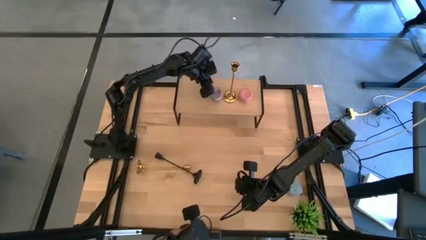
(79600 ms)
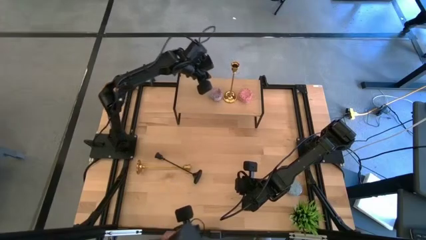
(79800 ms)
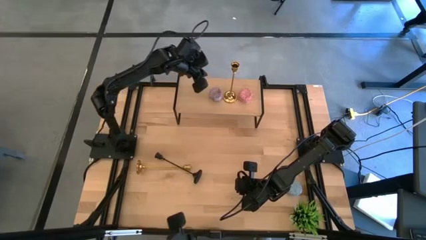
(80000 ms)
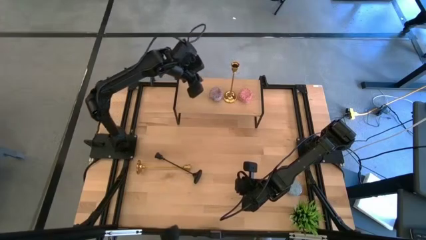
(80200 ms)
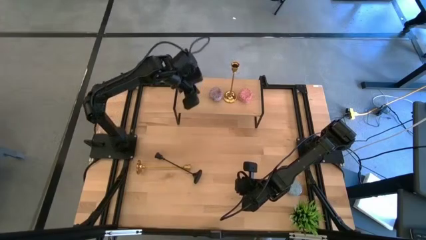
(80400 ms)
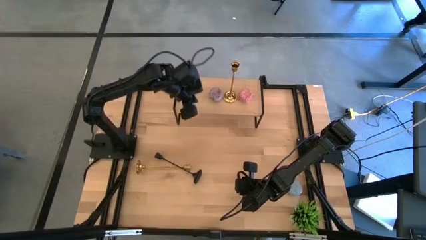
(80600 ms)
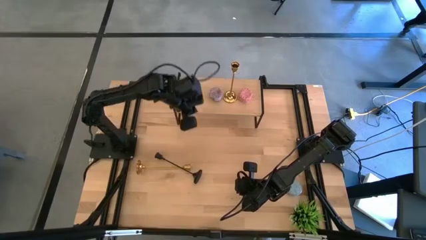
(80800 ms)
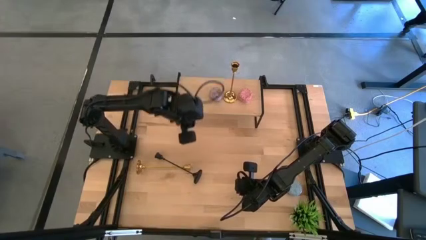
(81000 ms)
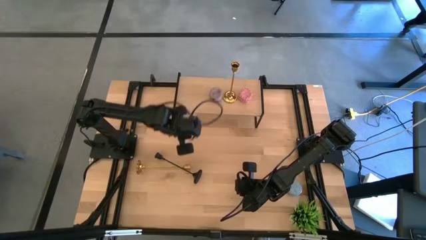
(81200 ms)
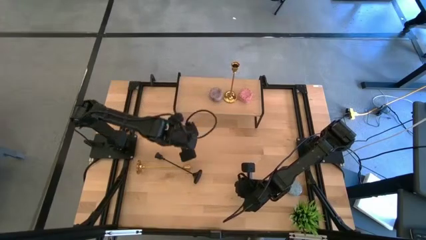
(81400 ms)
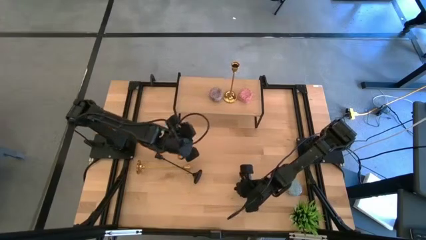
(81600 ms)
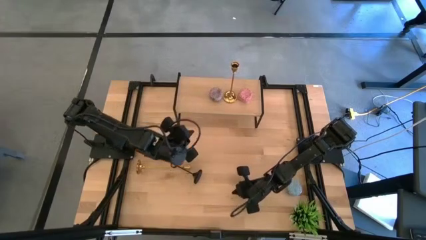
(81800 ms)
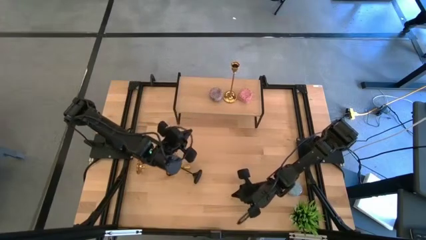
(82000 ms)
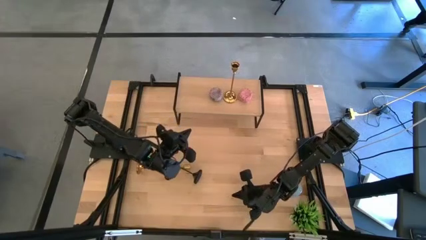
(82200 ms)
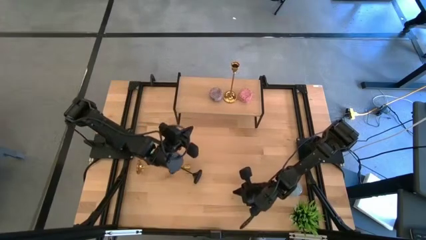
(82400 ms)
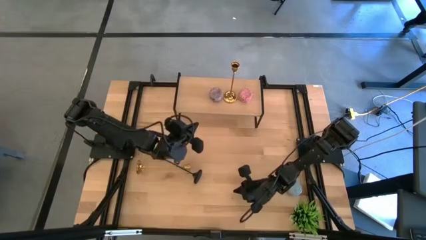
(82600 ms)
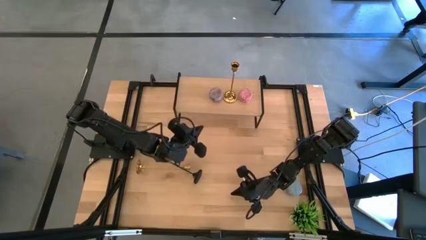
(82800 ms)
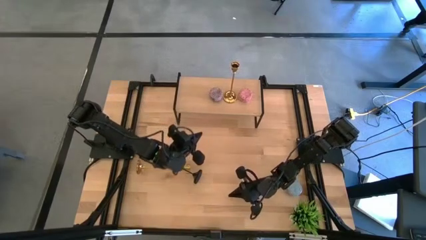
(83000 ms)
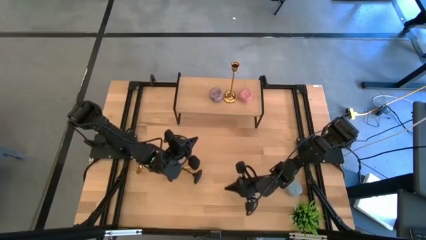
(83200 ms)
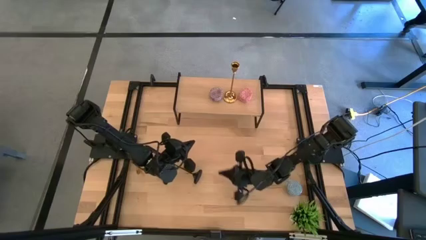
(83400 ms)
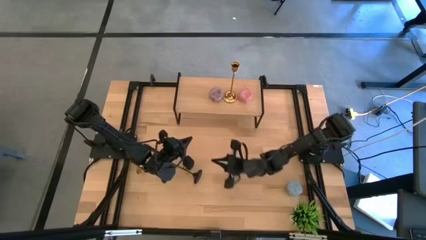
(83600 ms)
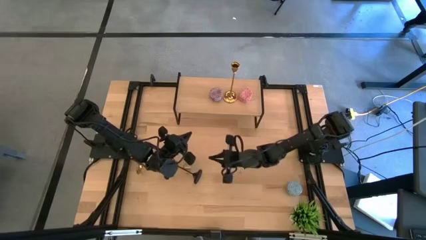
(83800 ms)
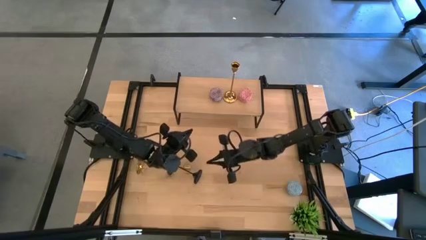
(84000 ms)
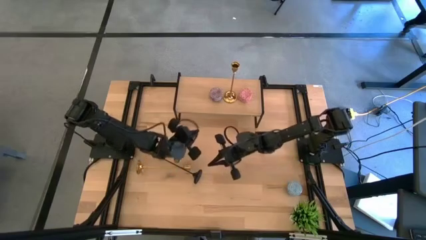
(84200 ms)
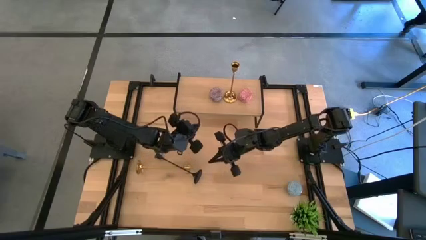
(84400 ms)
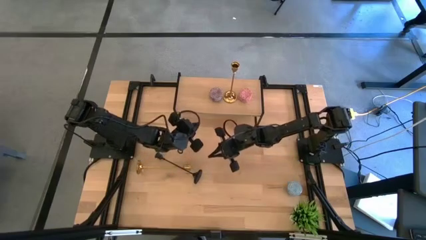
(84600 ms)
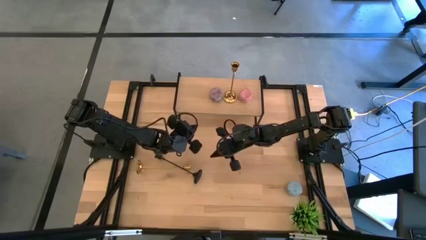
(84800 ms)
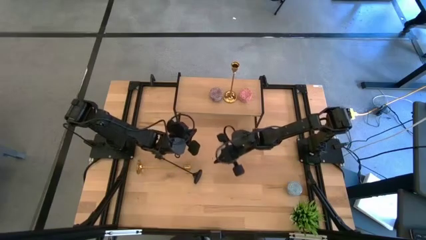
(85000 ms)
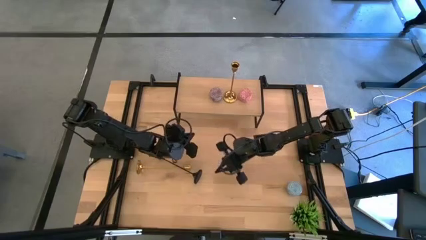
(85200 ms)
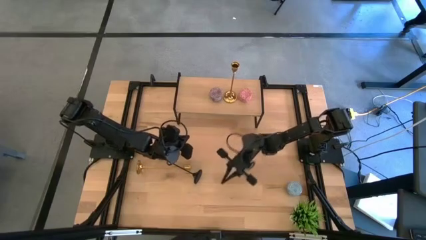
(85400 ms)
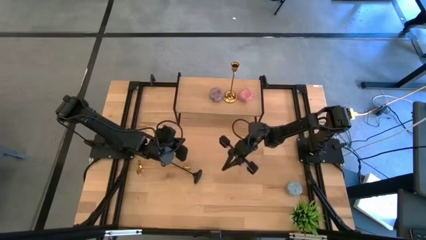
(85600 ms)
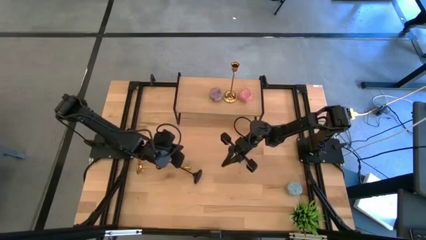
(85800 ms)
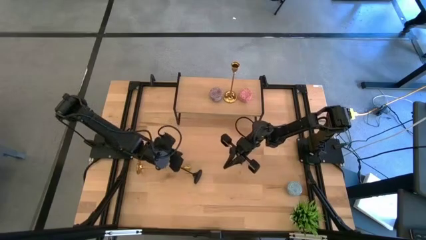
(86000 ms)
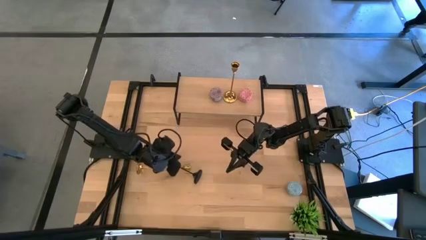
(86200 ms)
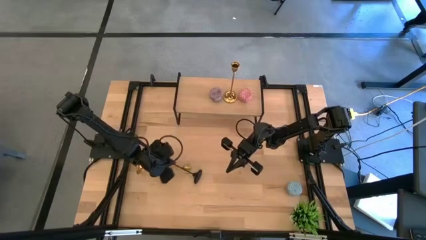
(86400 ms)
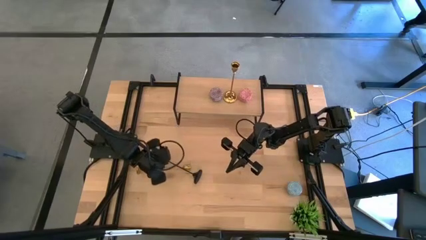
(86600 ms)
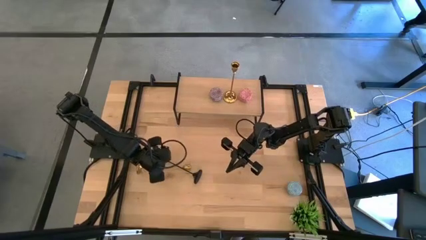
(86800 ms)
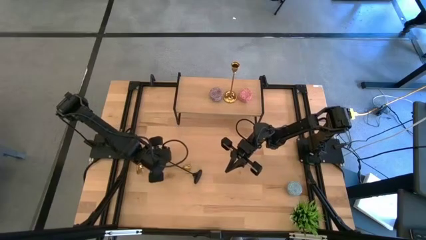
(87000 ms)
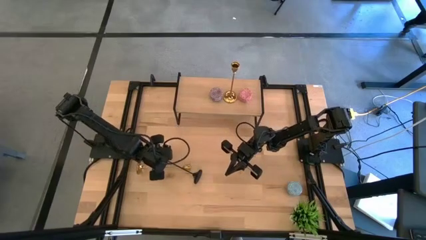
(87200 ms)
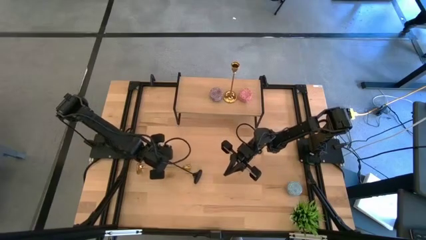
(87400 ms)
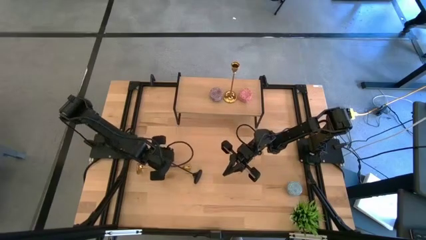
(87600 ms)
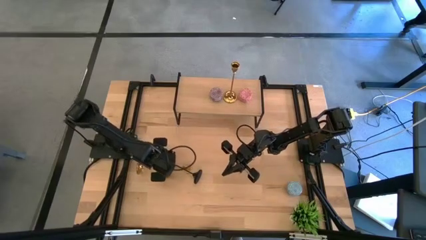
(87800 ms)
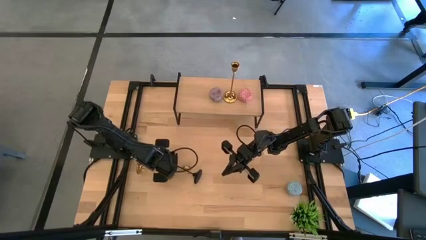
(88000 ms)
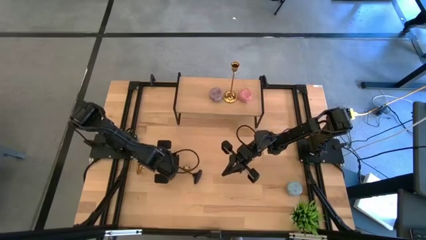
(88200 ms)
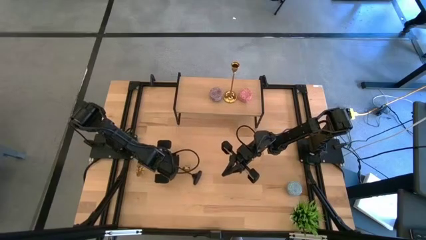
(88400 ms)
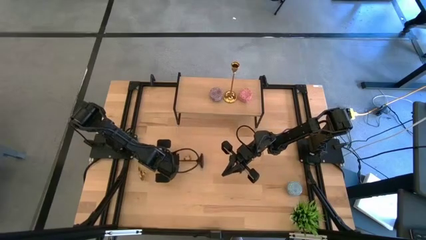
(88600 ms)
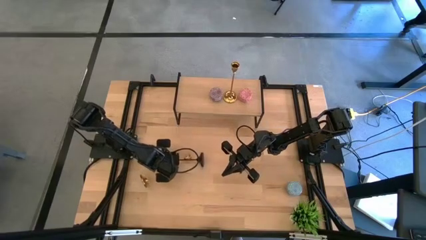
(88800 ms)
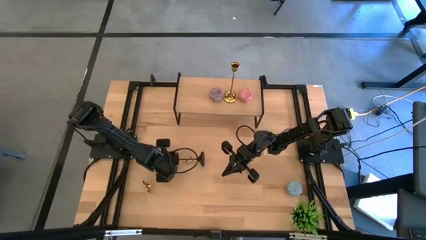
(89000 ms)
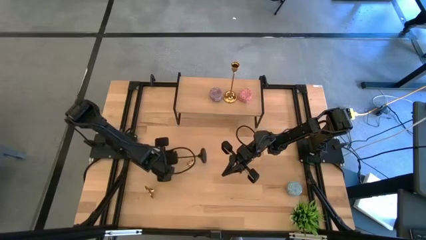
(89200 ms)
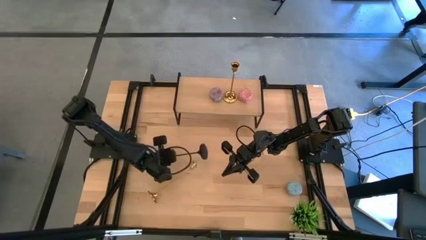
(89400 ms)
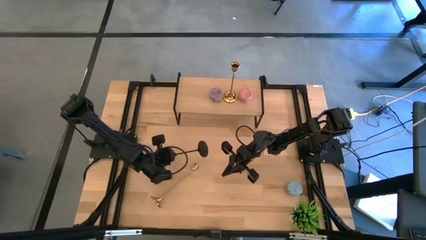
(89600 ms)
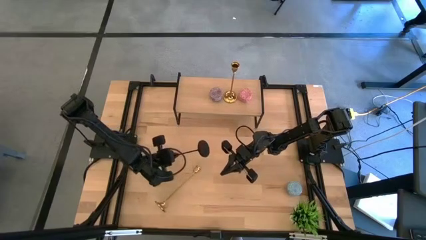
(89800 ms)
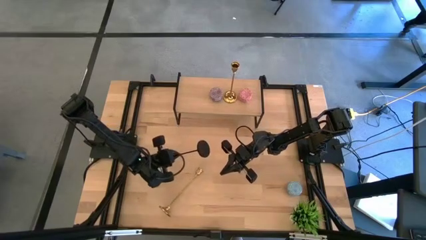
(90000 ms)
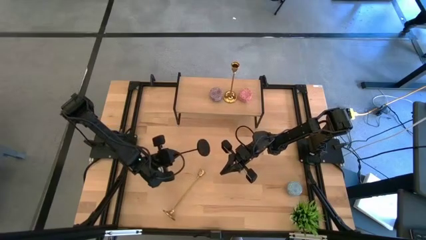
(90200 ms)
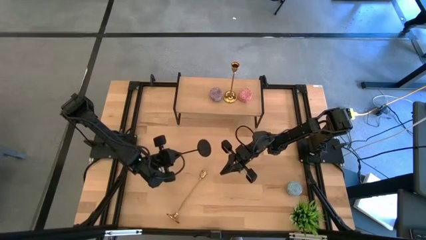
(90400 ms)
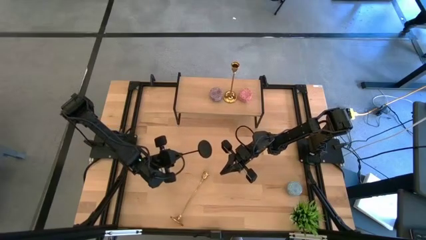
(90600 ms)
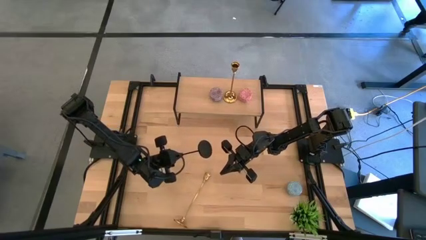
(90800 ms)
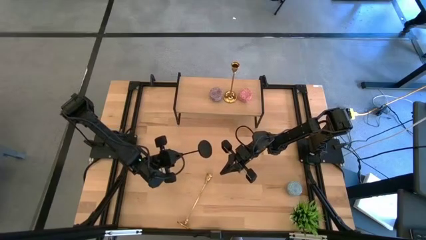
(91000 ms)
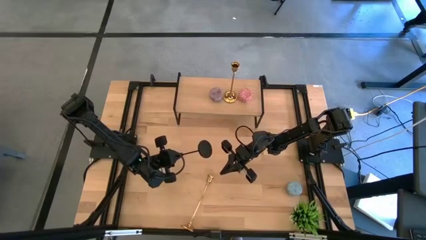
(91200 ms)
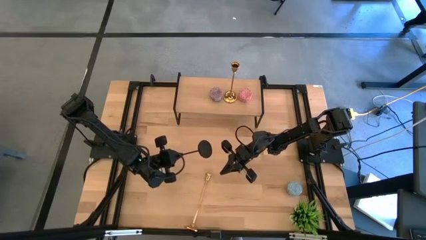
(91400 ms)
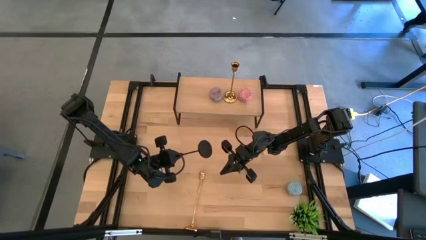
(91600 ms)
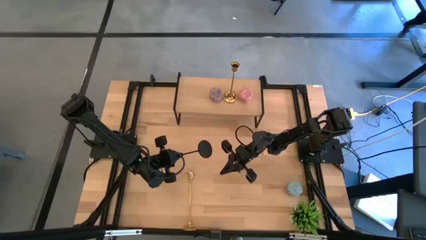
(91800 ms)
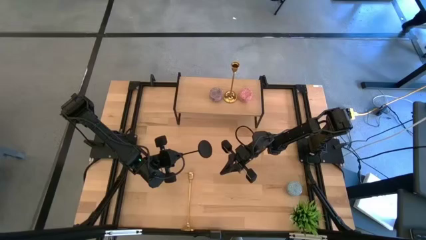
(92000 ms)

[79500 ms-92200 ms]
Task: Pick & Place candle stick holders
Put the black candle holder on the shelf

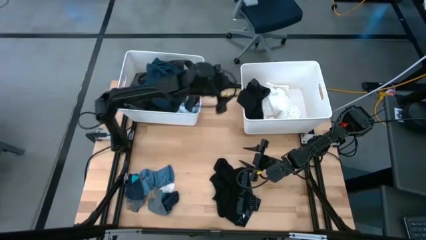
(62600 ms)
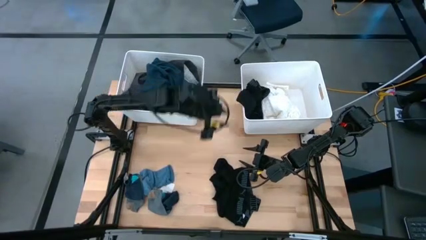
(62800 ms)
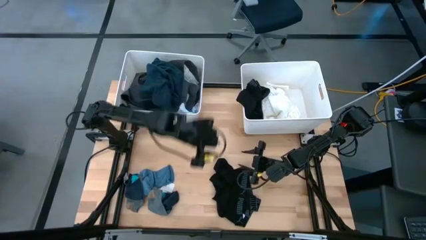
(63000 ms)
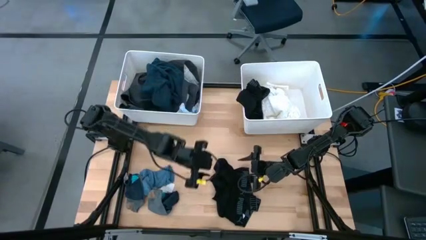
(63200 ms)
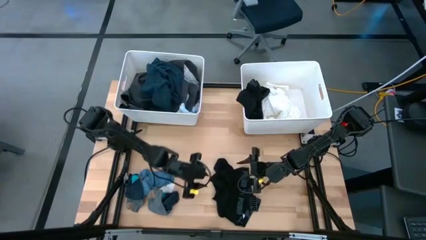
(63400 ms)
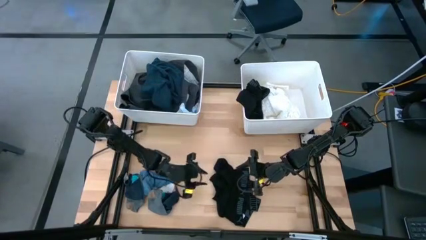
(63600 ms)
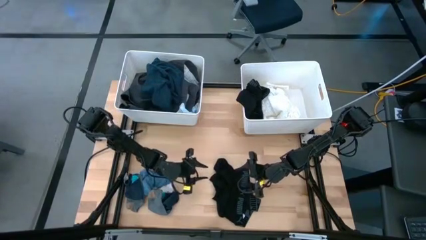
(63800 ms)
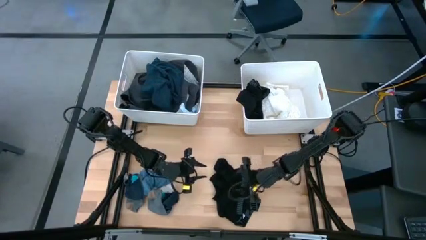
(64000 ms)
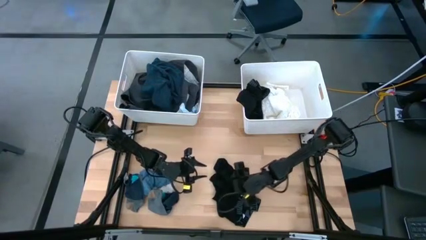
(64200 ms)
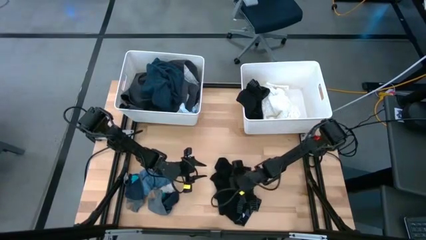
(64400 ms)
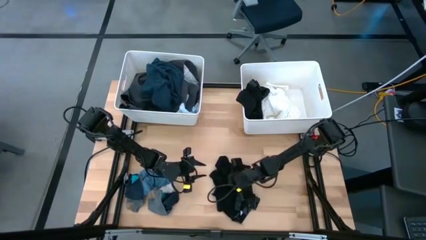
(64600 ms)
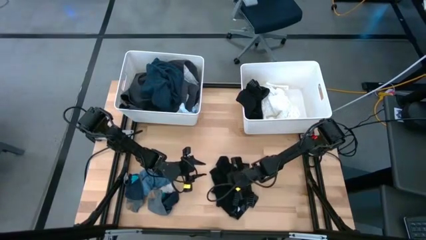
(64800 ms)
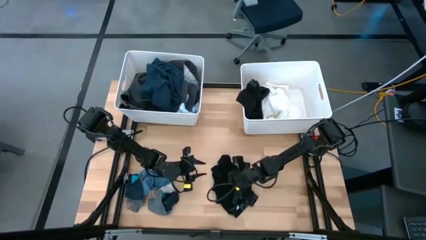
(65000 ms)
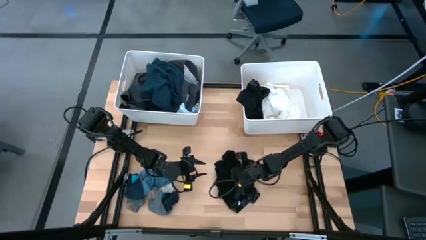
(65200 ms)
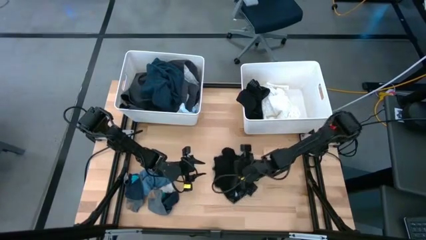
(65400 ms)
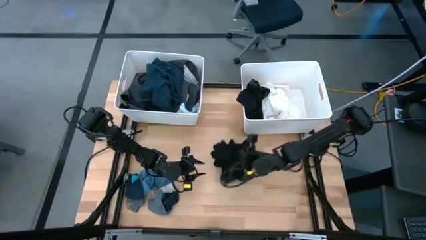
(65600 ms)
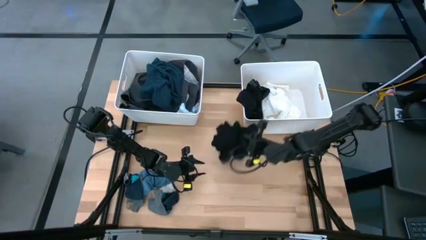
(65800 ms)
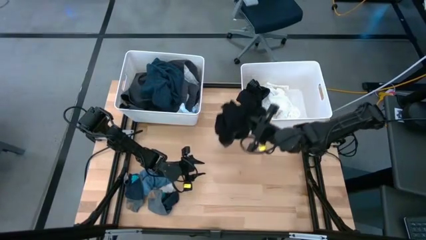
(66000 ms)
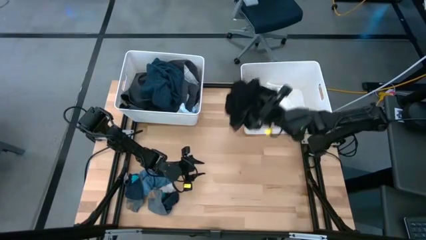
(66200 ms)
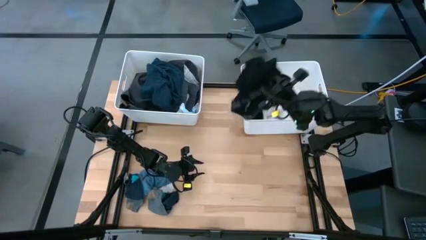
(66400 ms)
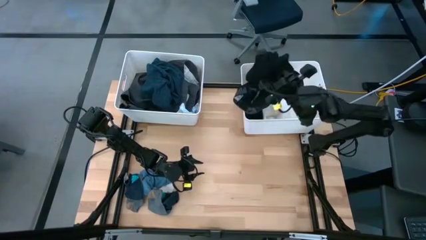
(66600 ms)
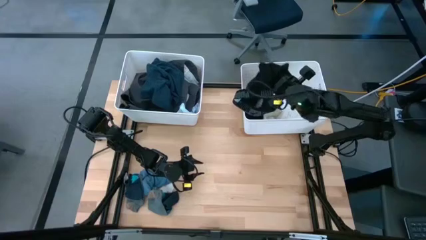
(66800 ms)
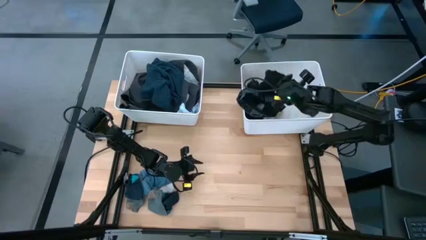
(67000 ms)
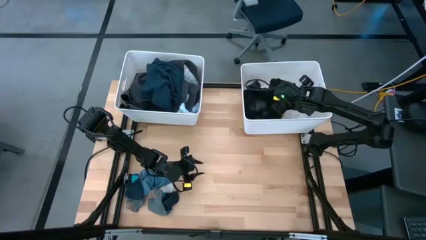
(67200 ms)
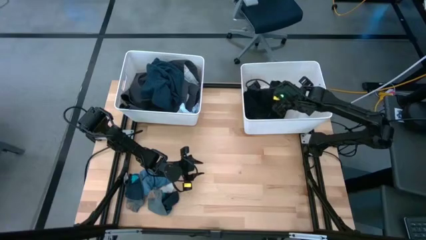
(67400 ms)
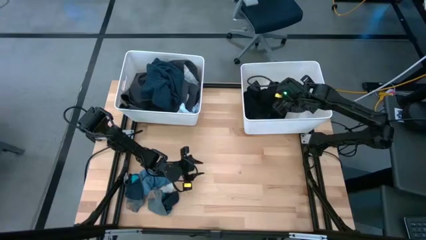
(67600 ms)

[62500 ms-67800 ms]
Task: Sort clothes
Put the black boxer into the right white laundry bin
